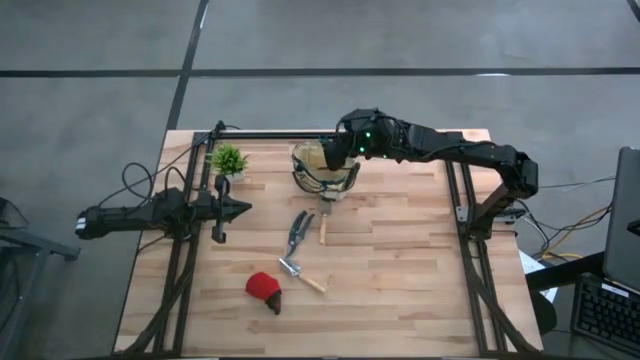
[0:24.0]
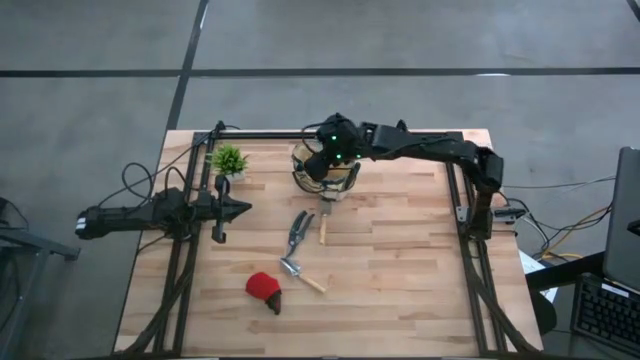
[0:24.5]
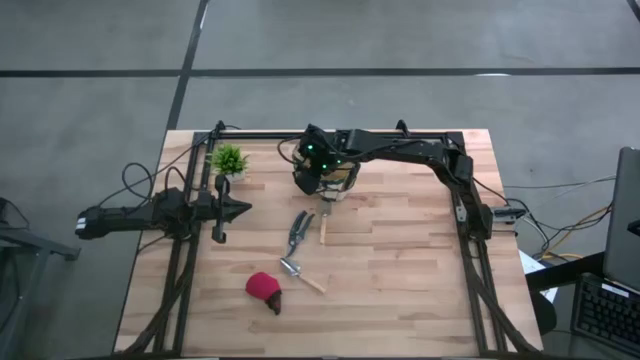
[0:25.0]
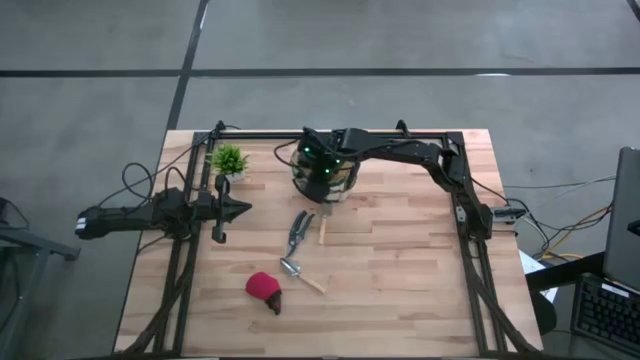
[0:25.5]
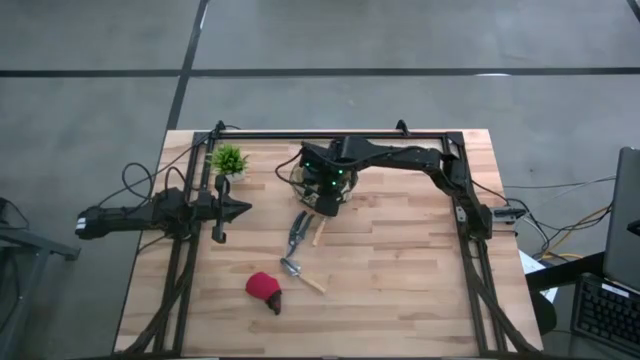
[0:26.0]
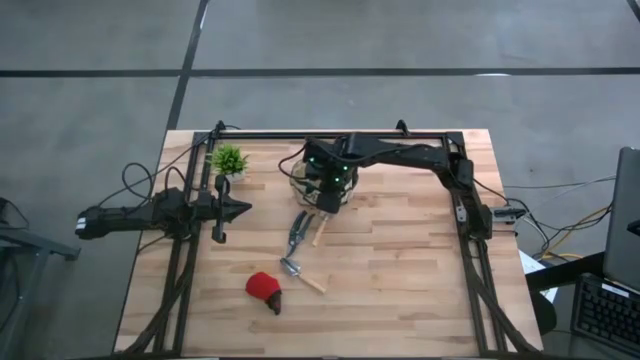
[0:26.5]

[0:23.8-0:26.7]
Task: Pick & Place Garden tools in Gardening bag
Adjust the brown gardening bag

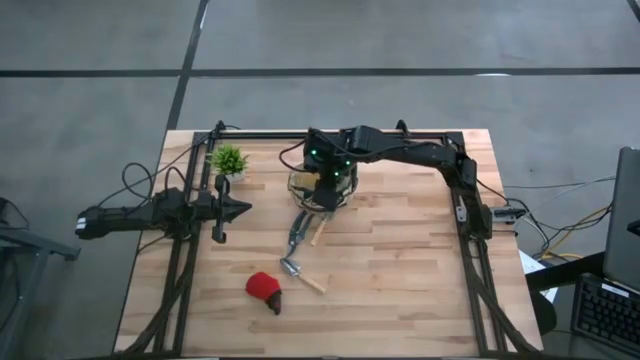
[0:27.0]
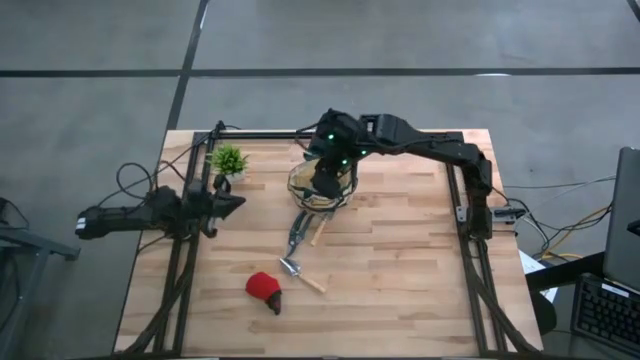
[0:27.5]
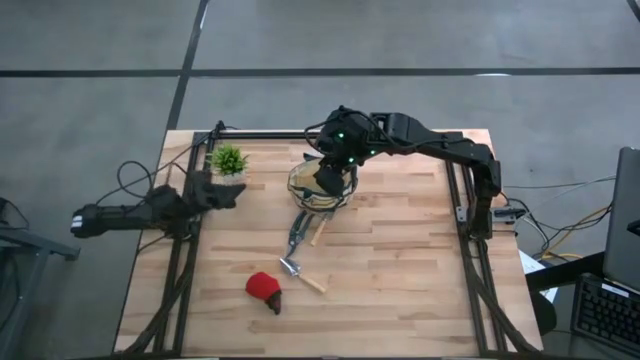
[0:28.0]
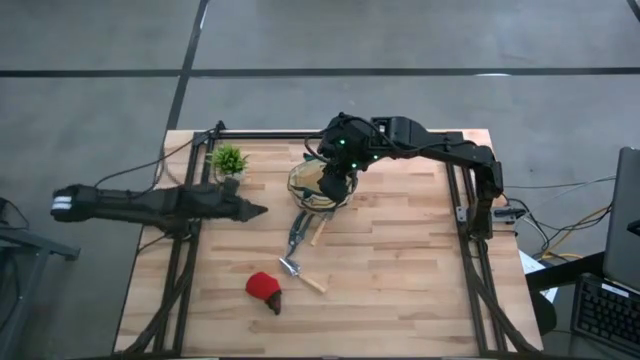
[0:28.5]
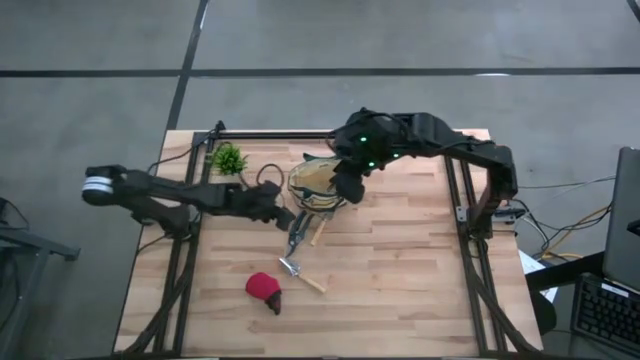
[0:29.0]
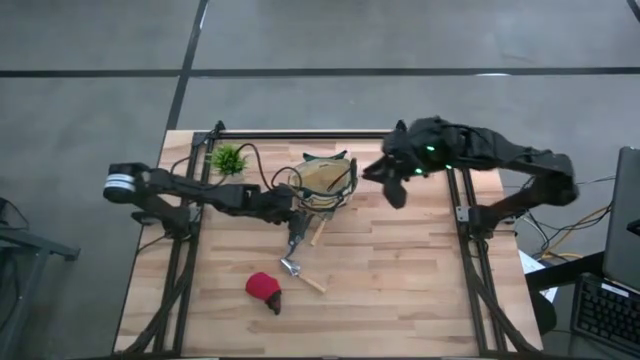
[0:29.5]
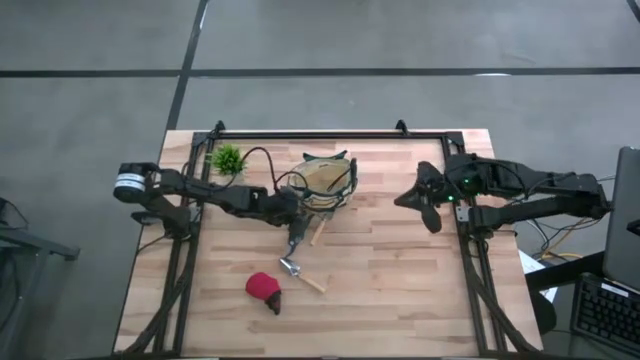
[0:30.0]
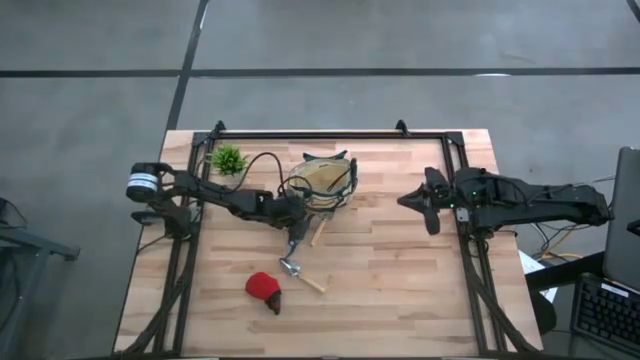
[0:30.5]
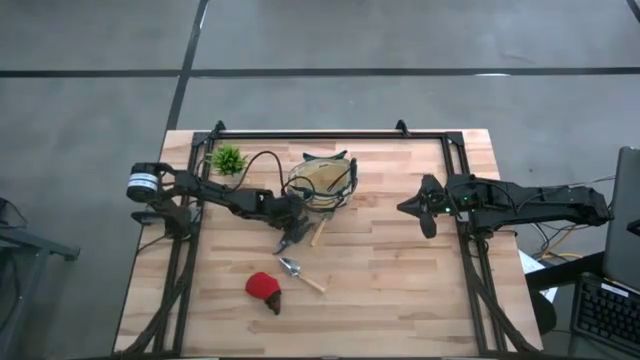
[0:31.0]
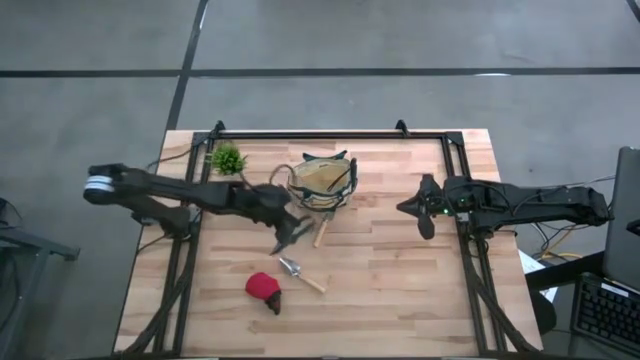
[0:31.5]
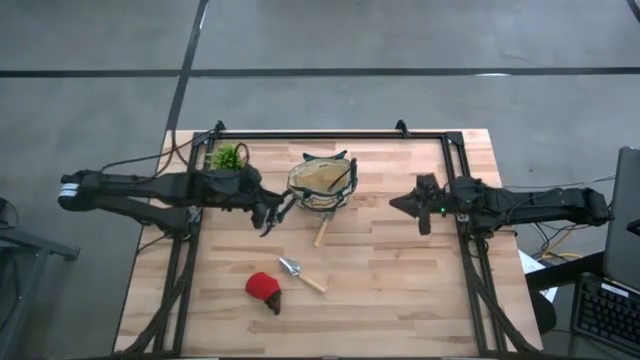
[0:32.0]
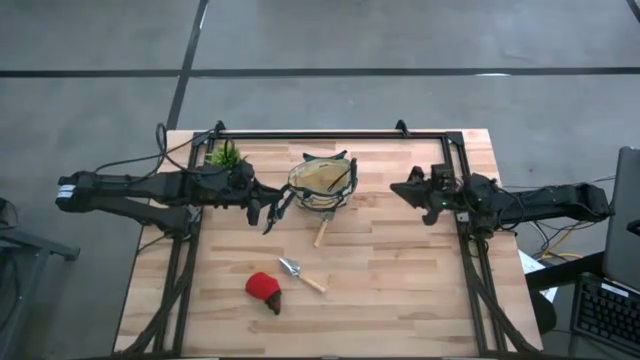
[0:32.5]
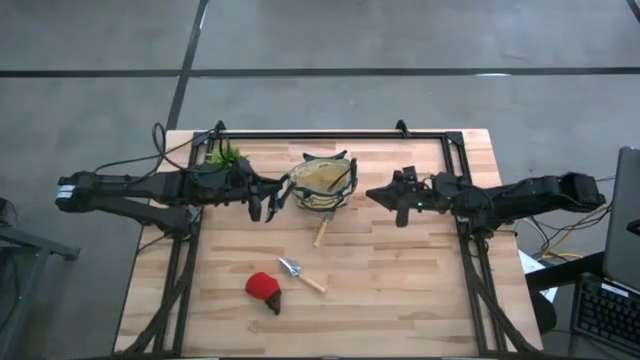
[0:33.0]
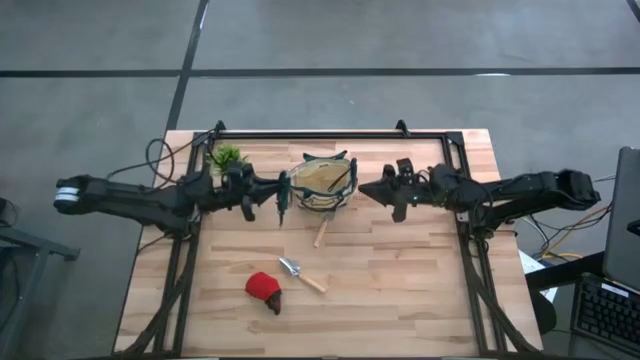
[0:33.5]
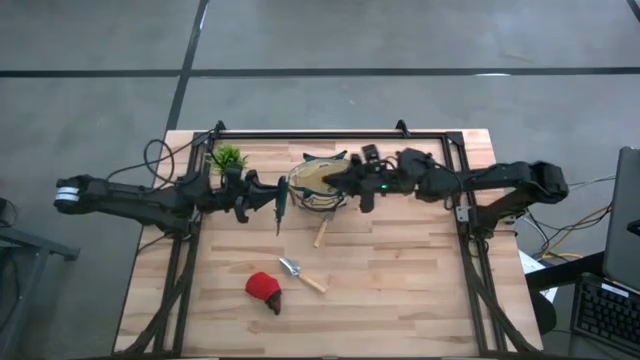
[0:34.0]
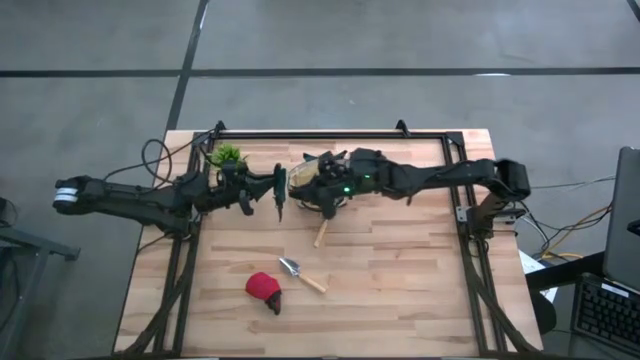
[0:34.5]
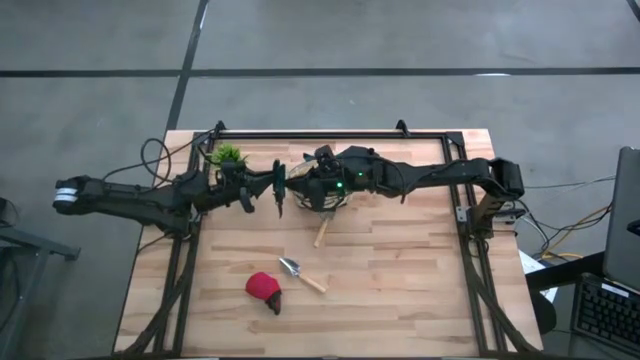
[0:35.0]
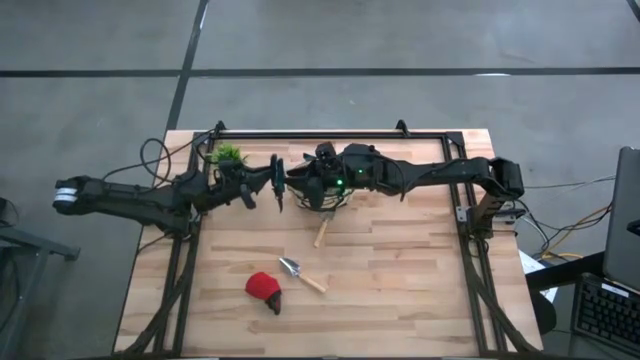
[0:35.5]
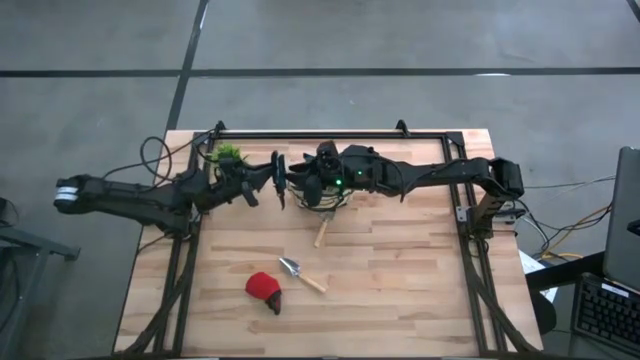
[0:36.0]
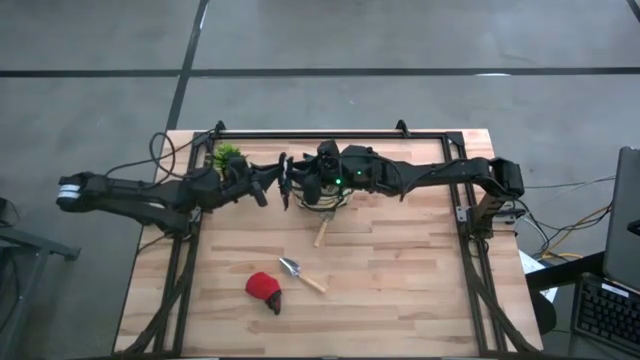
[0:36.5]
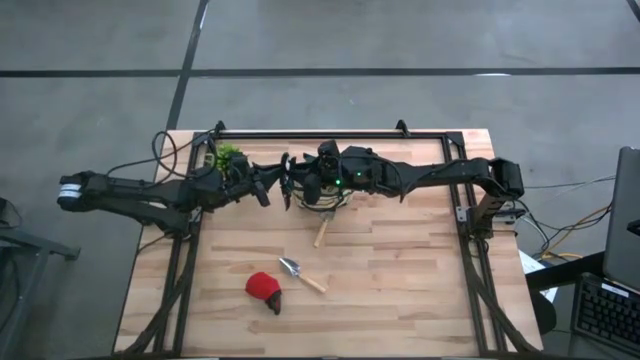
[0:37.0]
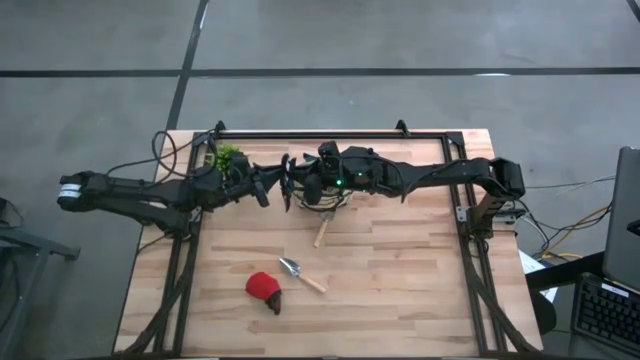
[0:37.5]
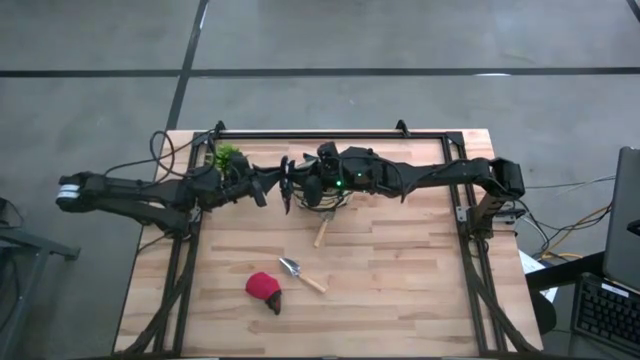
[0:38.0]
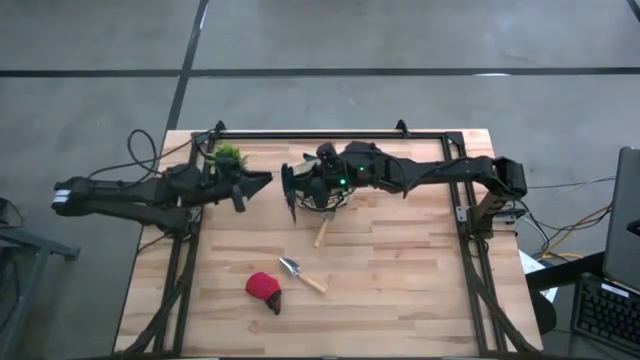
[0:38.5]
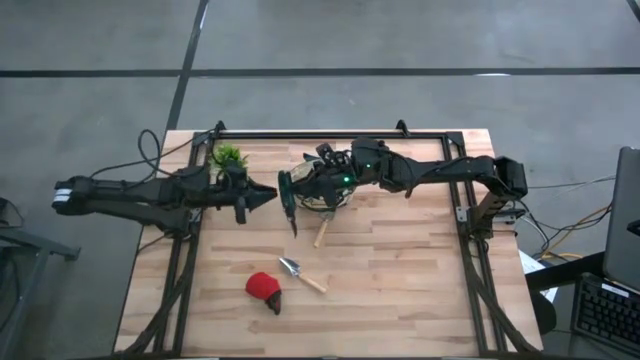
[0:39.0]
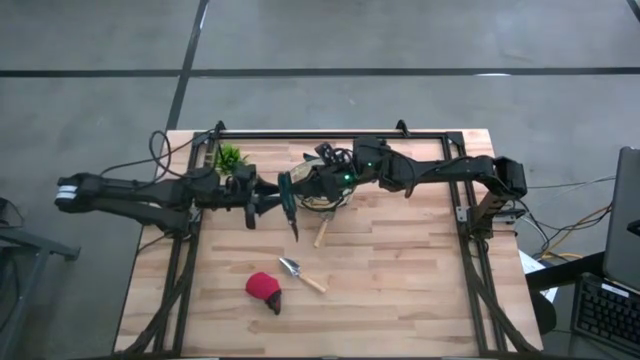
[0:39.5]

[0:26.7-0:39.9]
Put the green shear scissors into the brown gardening bag

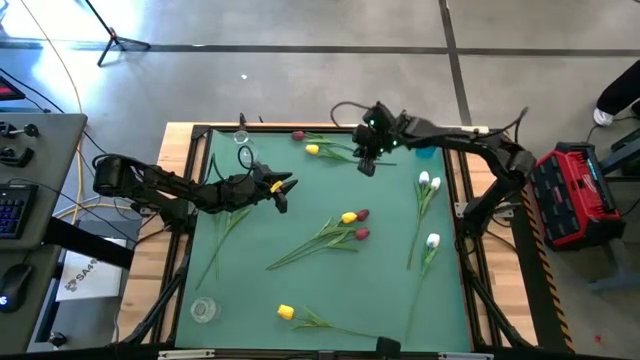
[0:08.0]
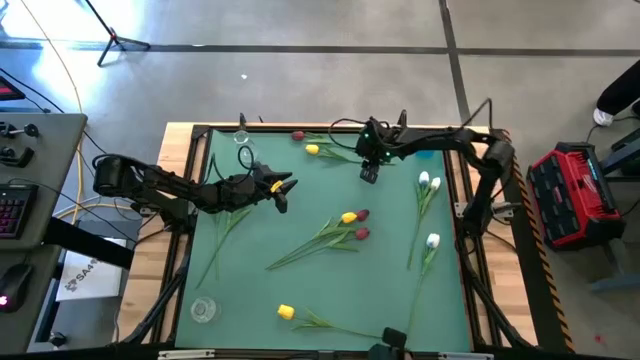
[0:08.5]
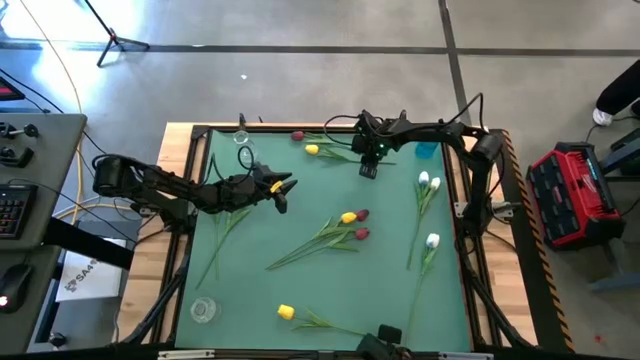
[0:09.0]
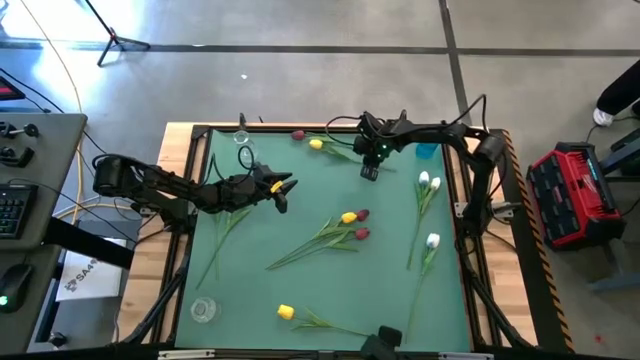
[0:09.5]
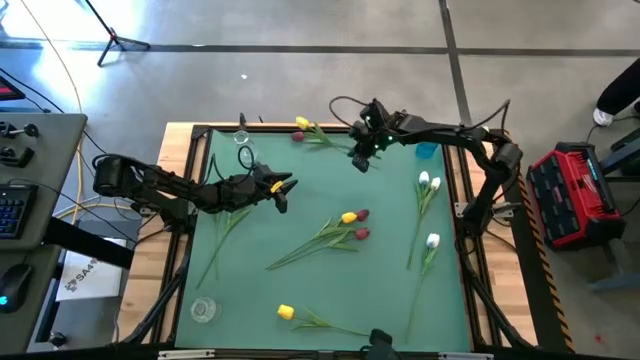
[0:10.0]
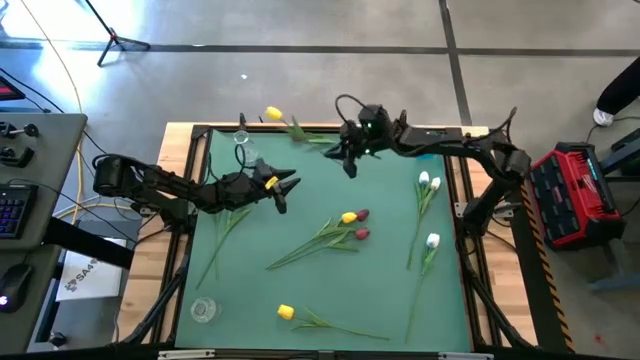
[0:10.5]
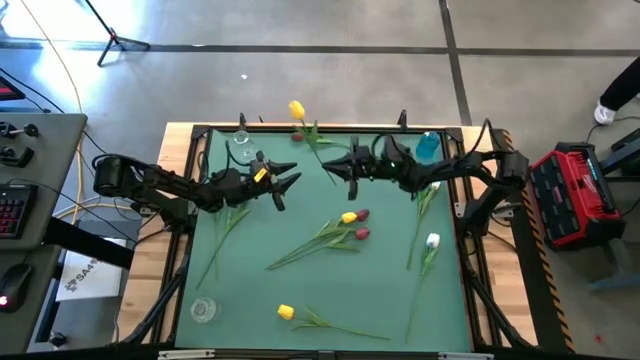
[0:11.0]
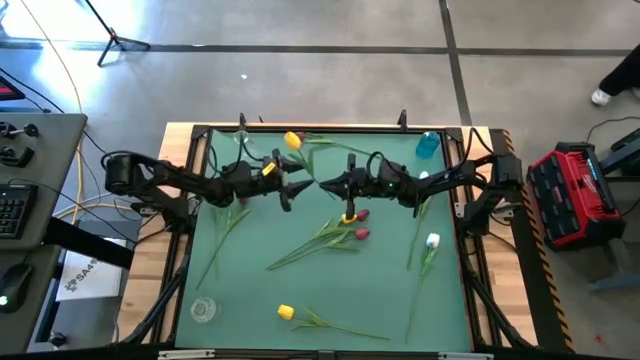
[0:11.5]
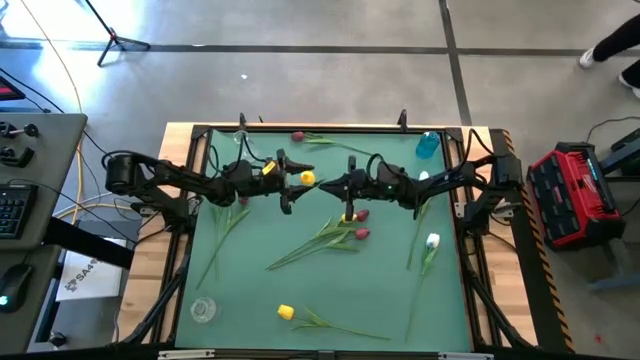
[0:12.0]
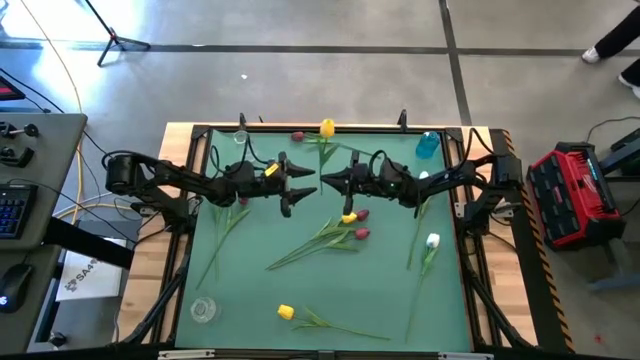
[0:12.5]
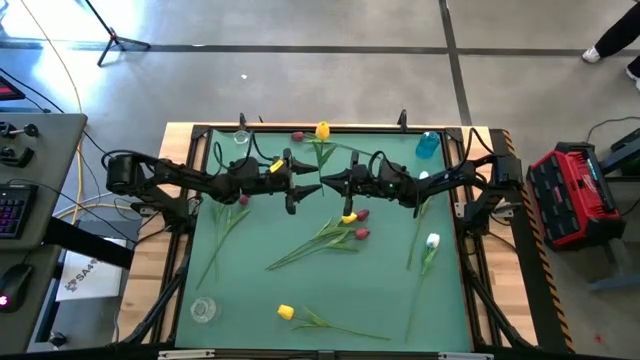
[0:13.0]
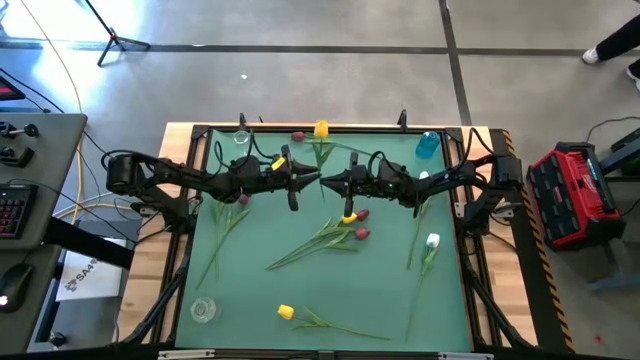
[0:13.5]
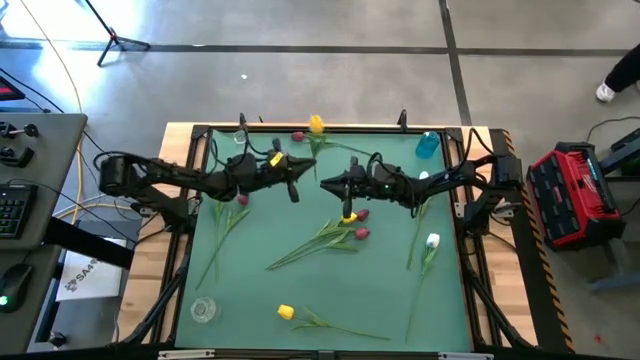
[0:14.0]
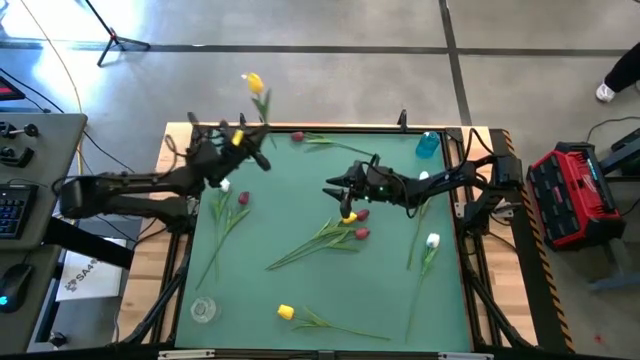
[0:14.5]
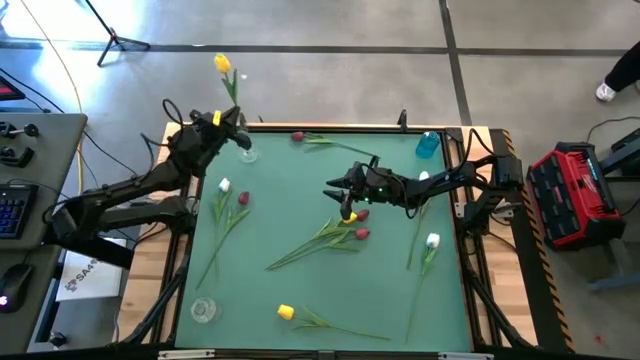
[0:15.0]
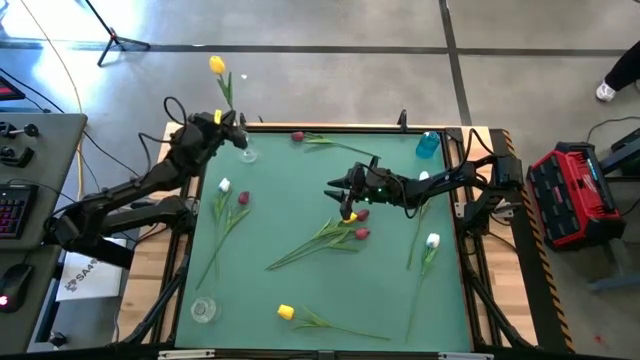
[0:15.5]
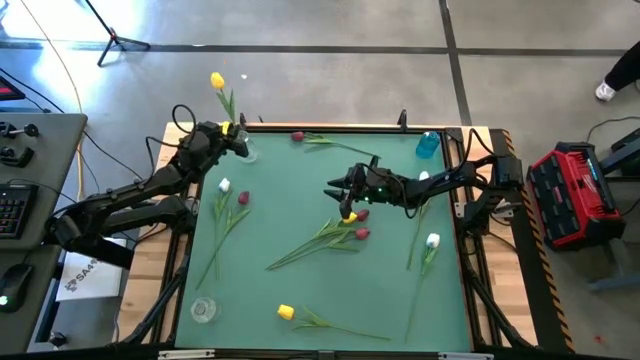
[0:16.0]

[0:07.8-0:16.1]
Task: Sort flowers into vase by color
Put the top yellow tulip into the top transparent vase
